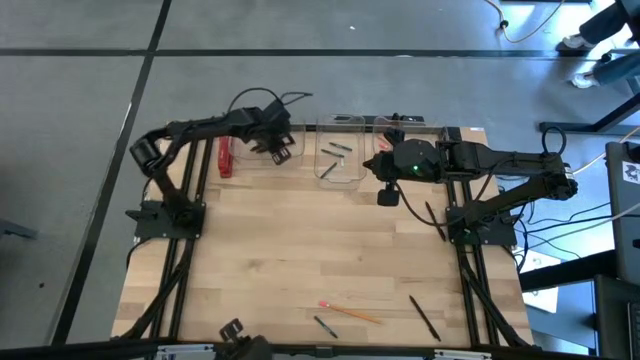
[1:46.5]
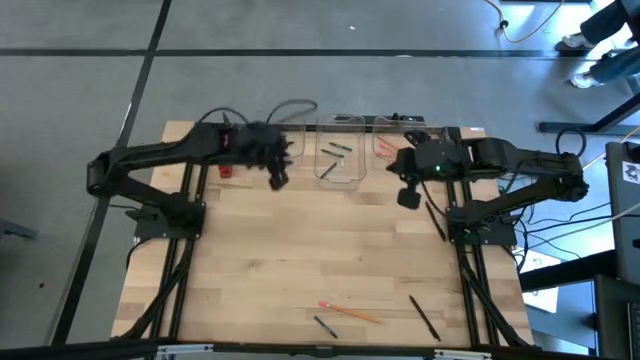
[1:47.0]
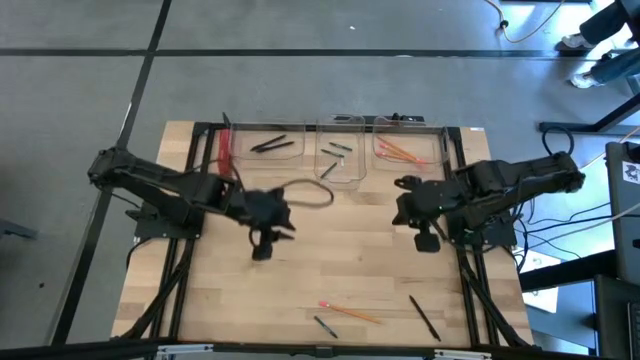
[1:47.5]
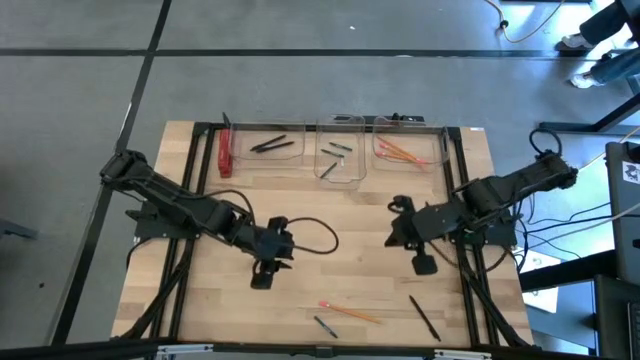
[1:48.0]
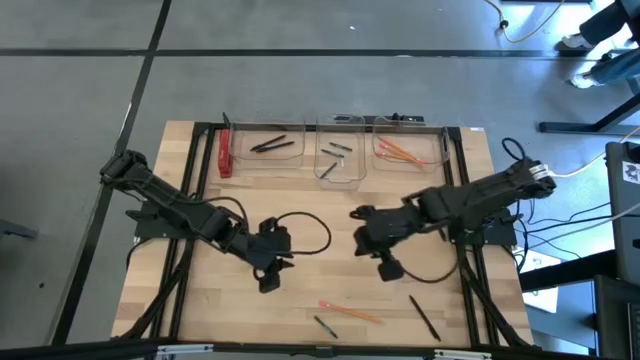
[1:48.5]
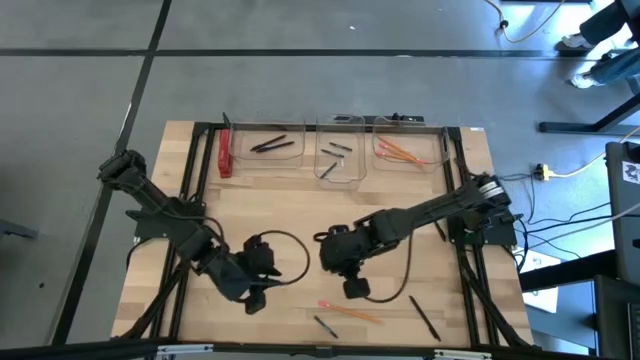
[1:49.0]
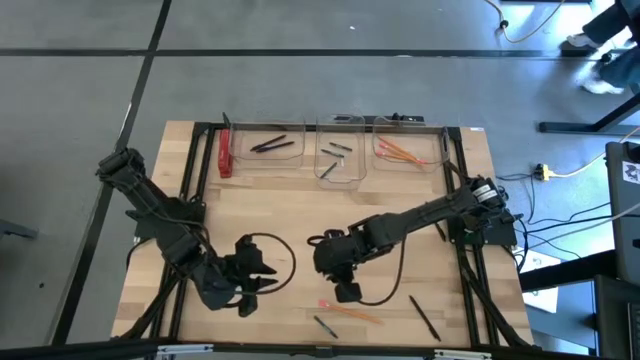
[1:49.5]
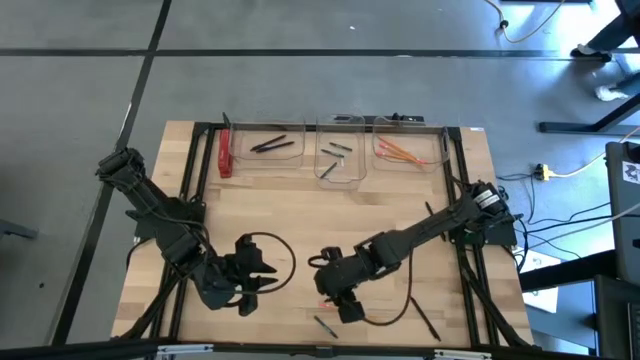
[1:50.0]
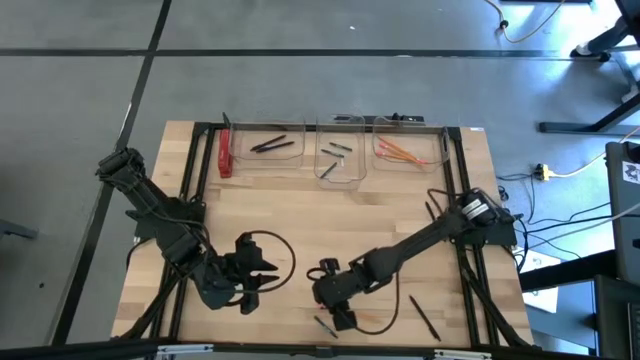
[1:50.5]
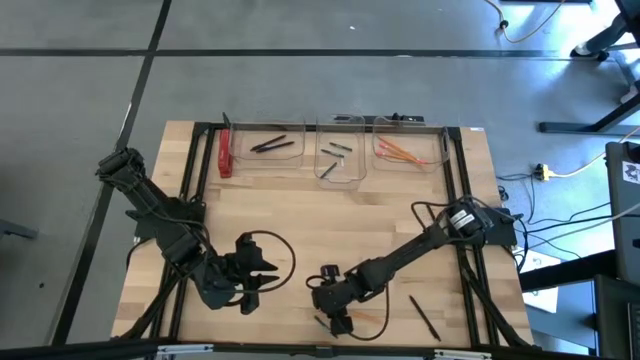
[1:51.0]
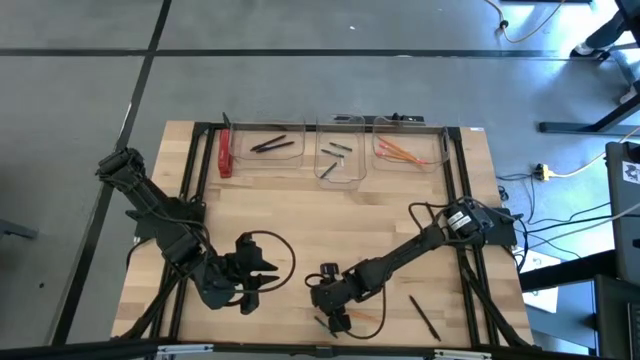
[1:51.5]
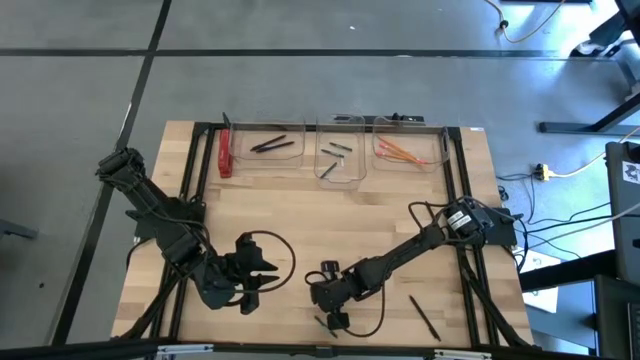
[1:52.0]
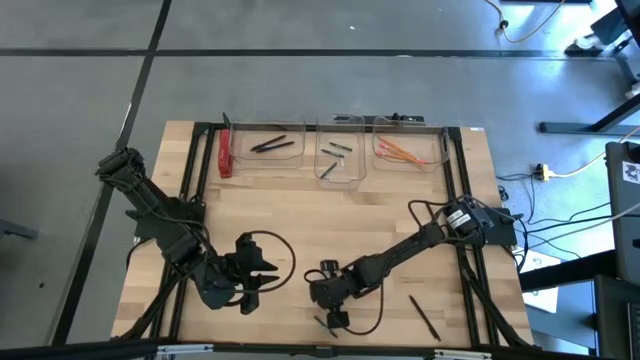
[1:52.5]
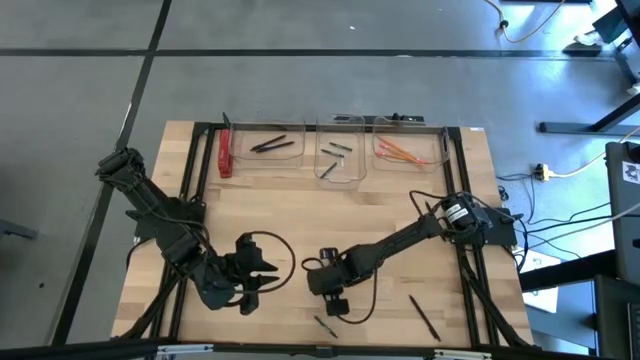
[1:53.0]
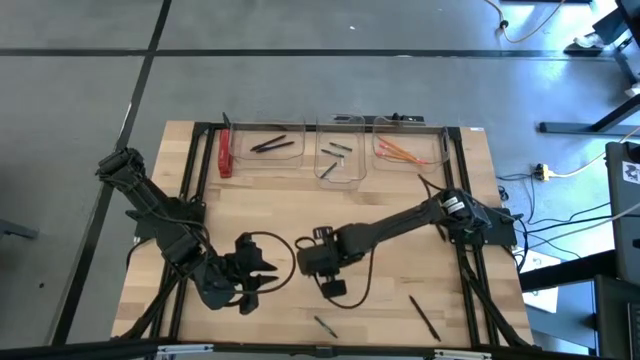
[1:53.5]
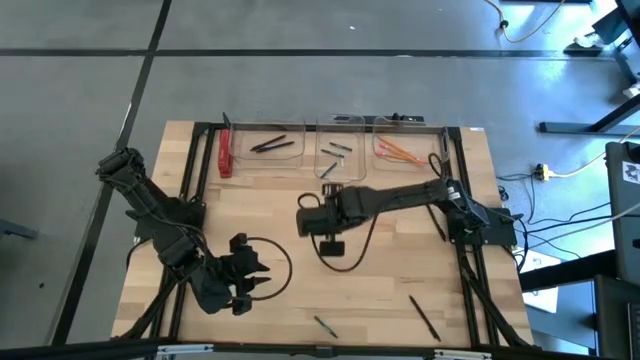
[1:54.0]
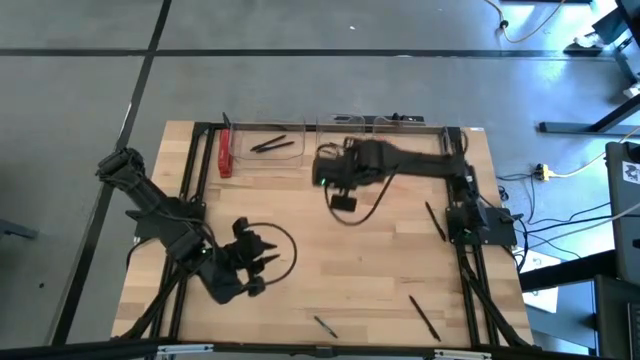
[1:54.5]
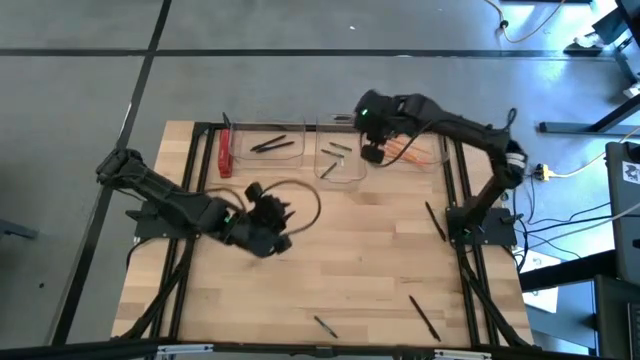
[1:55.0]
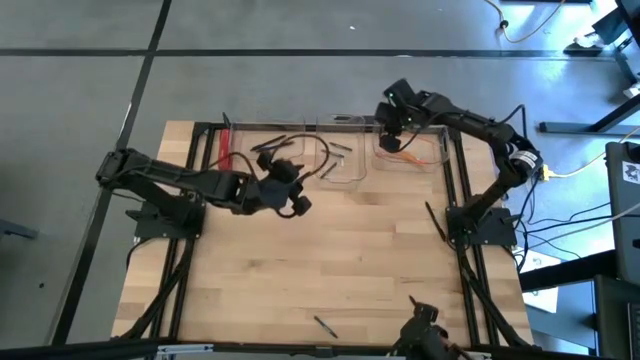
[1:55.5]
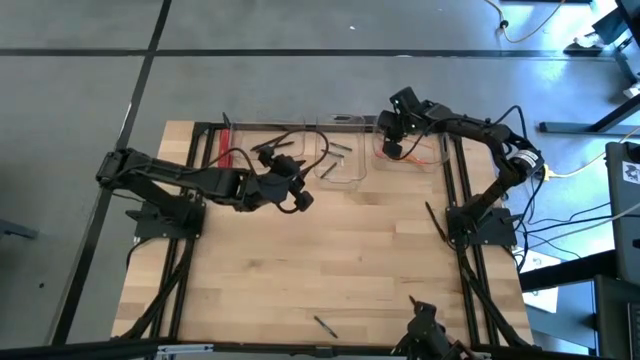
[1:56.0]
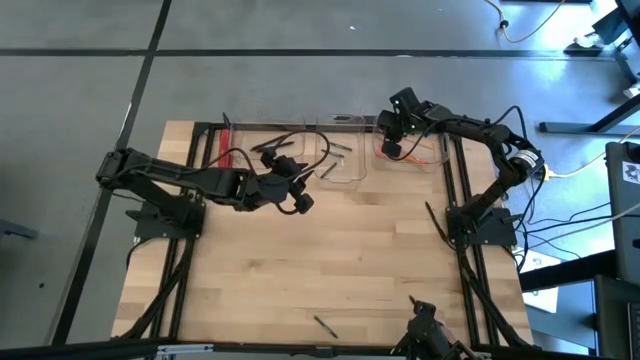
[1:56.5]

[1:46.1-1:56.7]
Task: Sort crayons/erasers/pens/pencils in bins
Put the orange pencil into the right transparent bin

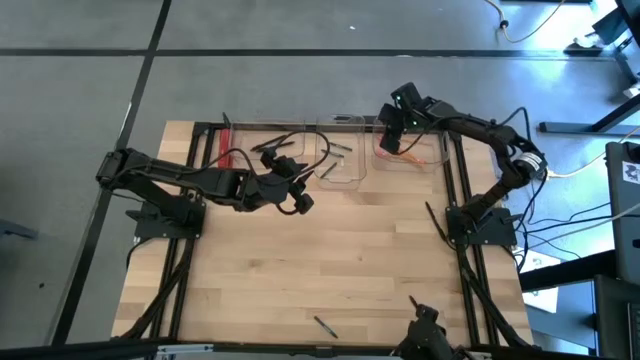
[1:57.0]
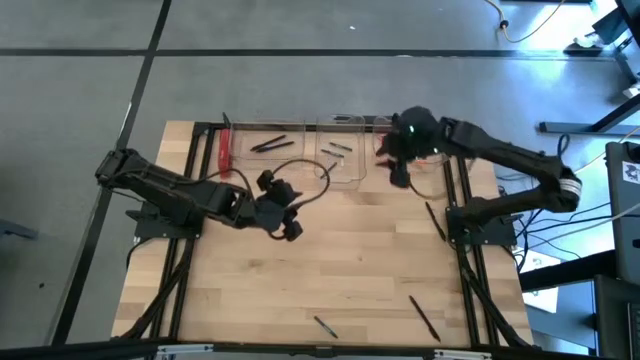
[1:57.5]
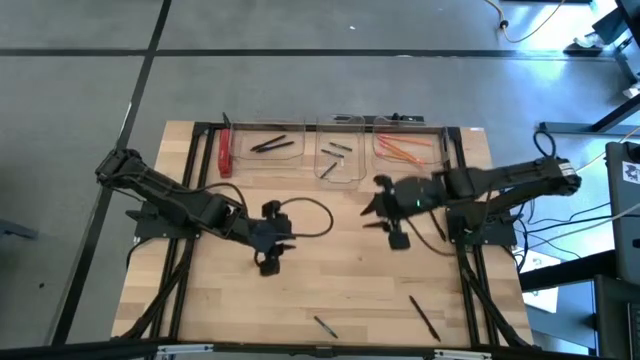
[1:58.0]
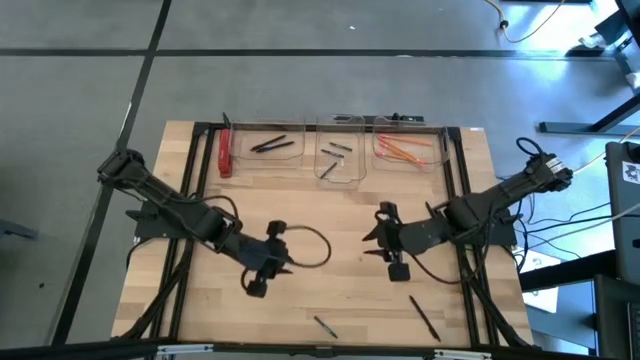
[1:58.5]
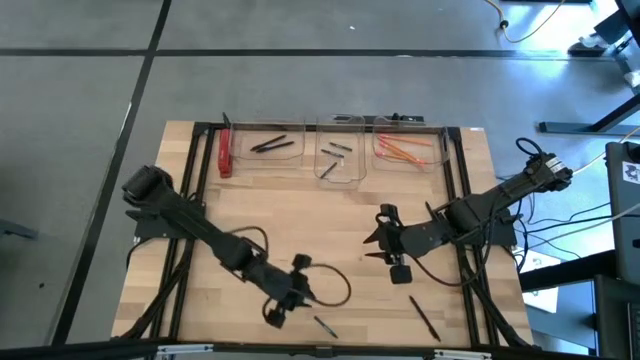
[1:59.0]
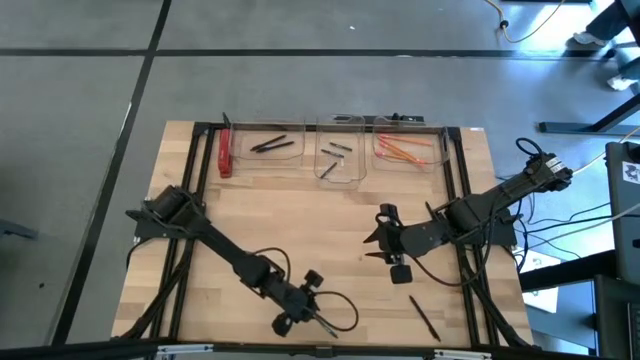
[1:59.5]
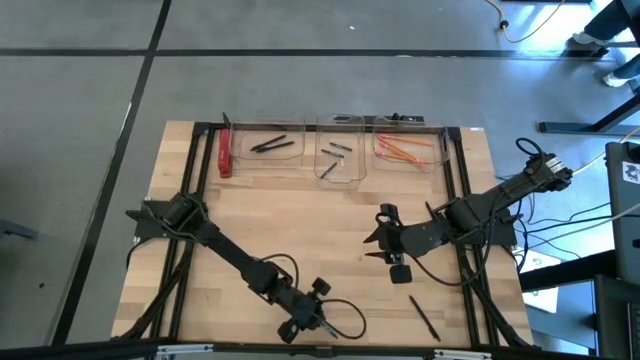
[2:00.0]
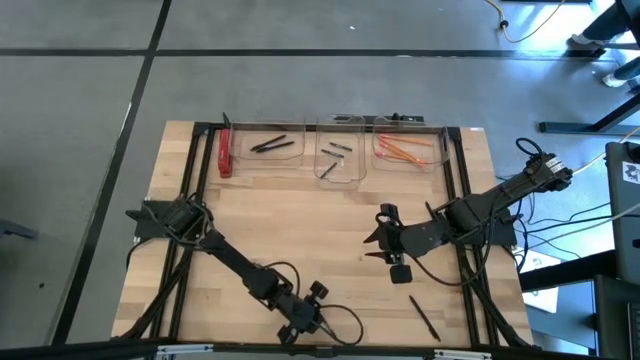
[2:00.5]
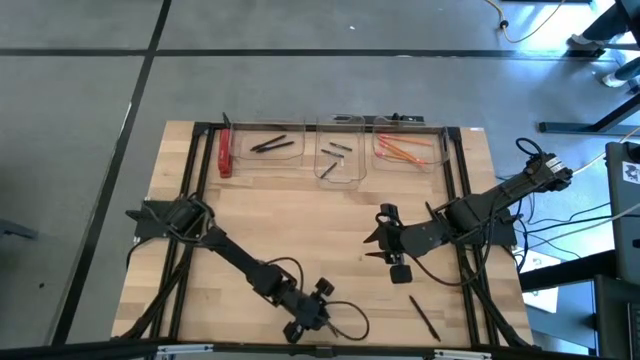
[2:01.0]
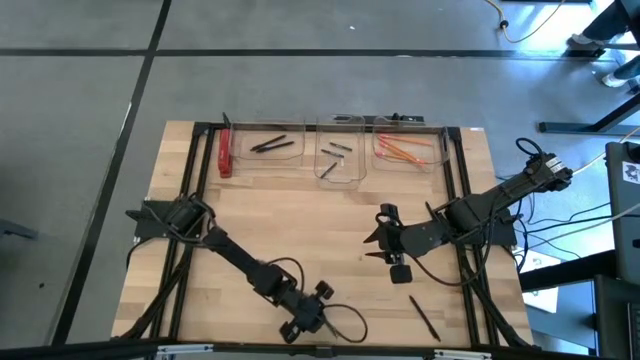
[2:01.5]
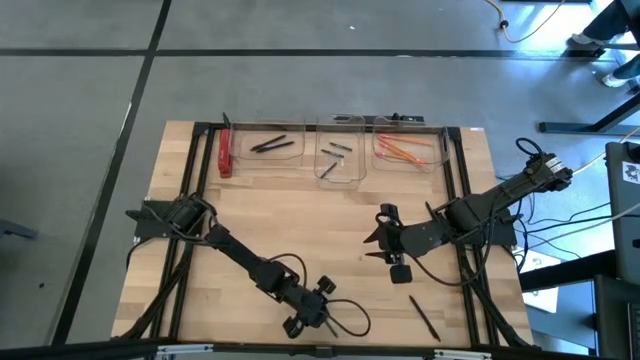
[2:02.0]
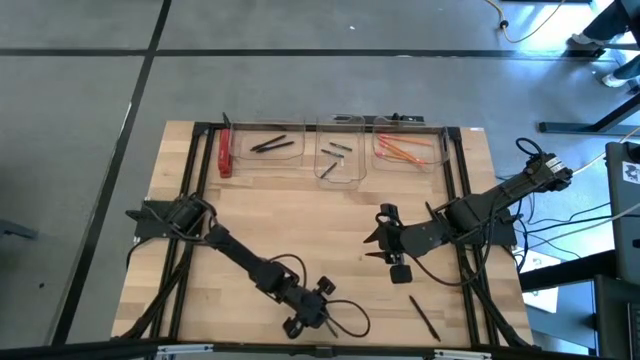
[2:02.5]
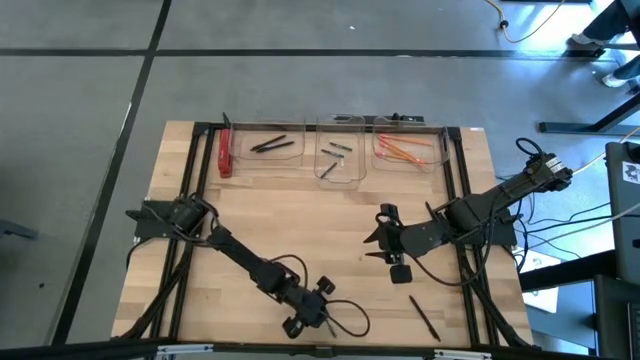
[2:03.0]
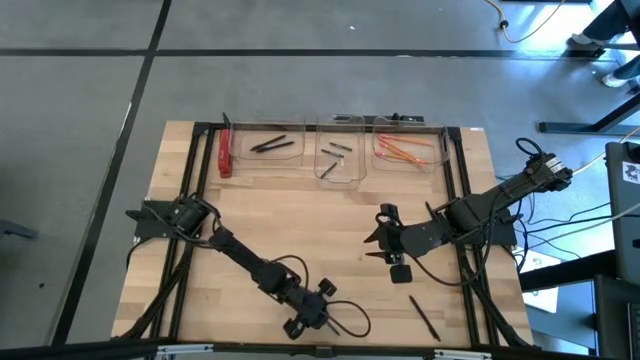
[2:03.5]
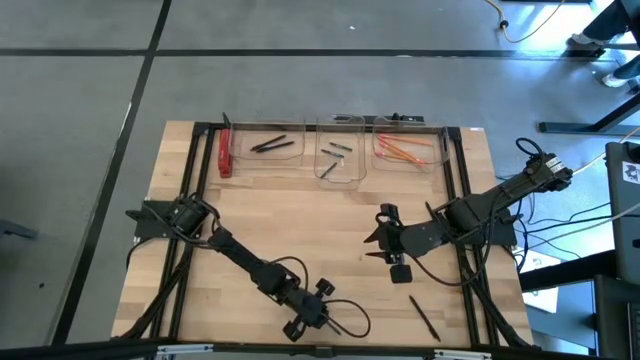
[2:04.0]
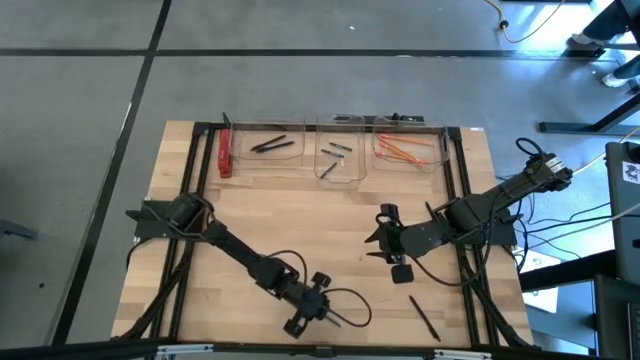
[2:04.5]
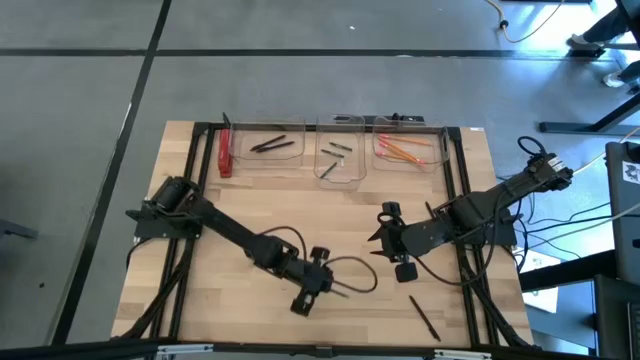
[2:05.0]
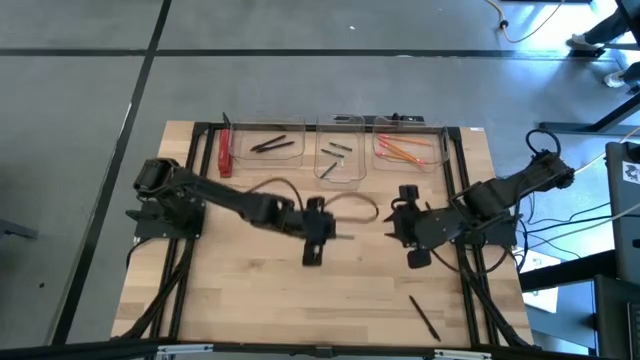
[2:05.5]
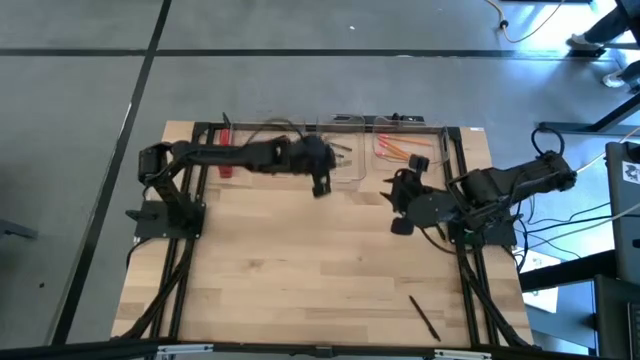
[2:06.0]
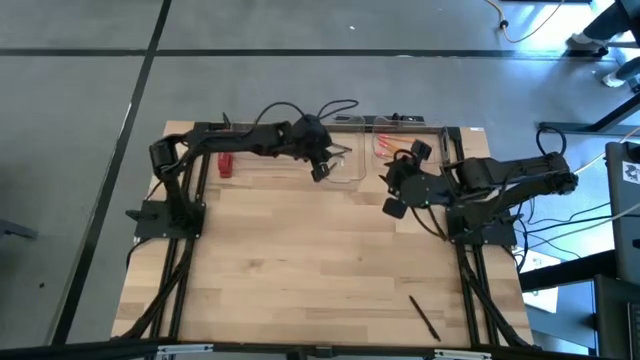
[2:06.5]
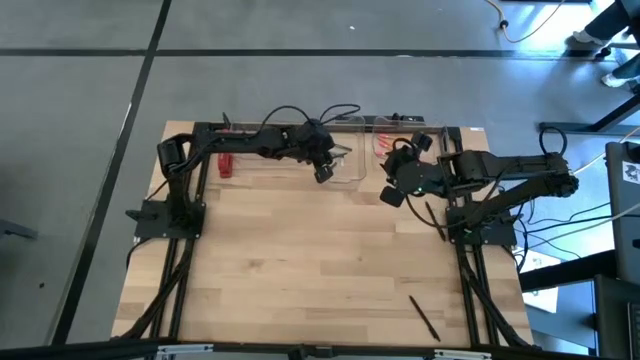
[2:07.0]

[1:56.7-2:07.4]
Put the green crayon into the middle transparent bin
